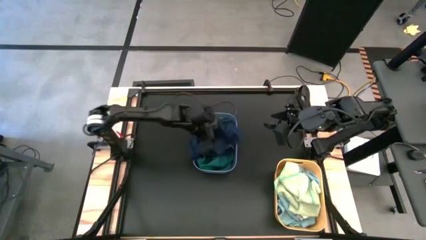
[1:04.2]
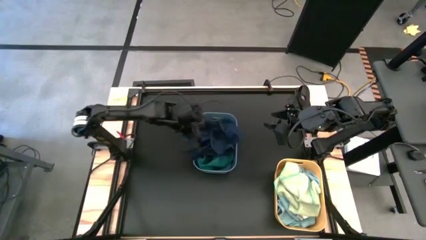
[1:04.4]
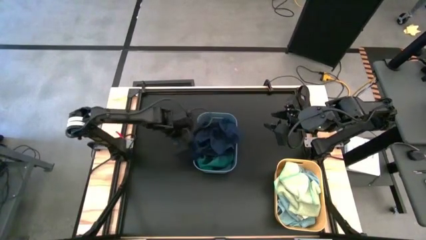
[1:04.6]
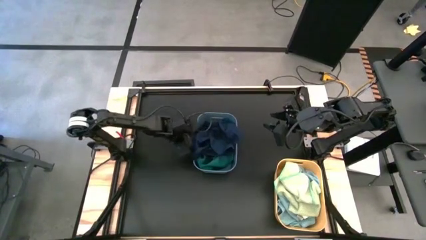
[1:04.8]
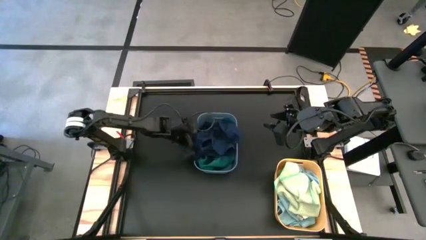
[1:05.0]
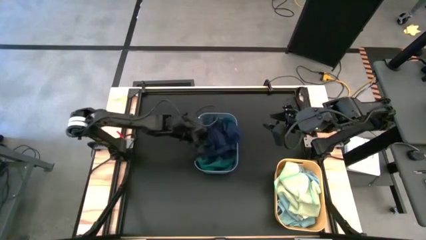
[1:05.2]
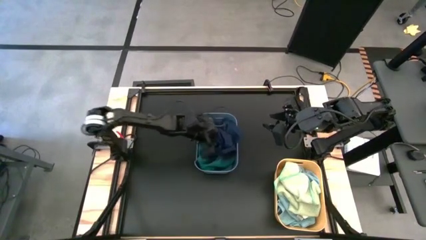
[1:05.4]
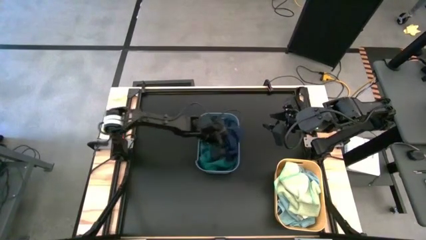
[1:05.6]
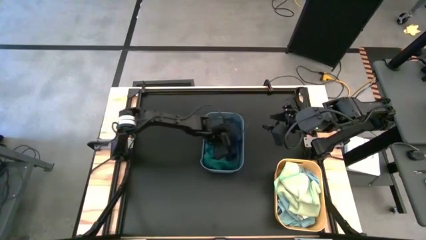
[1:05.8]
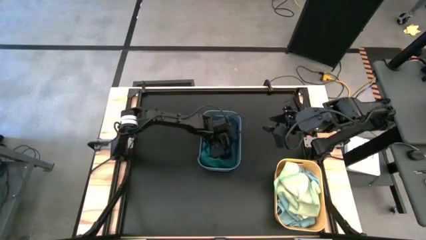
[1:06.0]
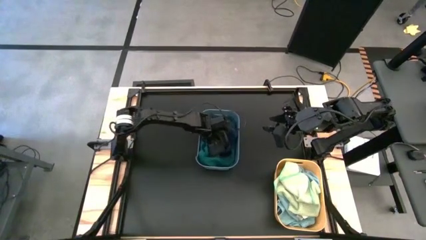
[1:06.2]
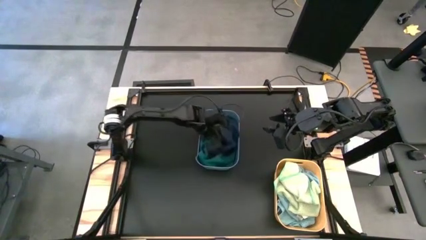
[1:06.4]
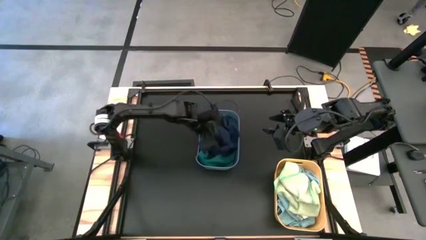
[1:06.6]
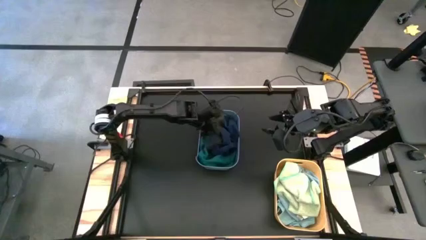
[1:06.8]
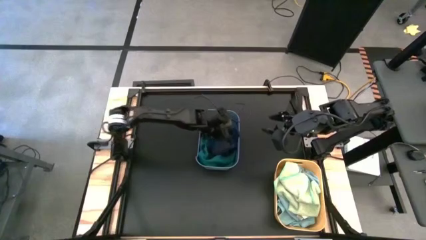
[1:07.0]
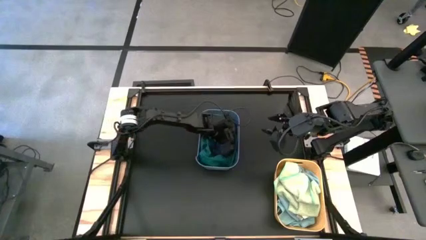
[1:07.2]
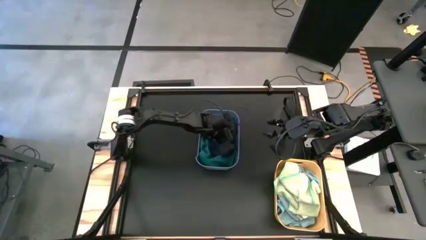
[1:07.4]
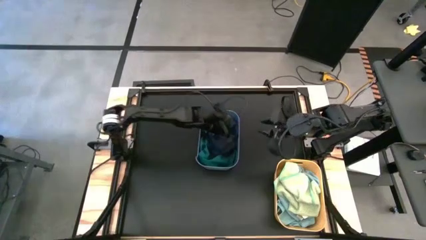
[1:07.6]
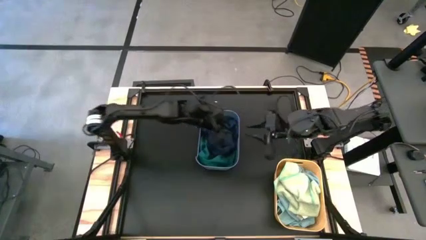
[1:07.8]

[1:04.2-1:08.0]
Task: Sort microfiber towel by color & place in baskets
Put the dark blue microfiber cloth into the blue bin

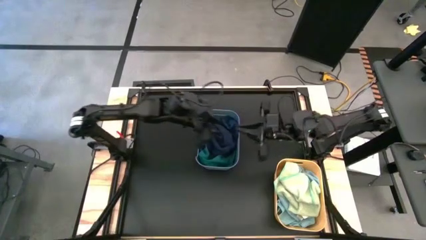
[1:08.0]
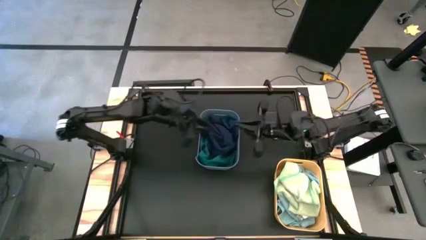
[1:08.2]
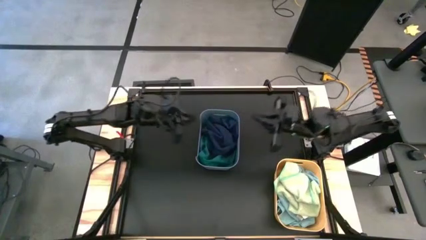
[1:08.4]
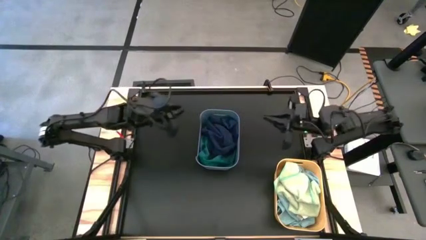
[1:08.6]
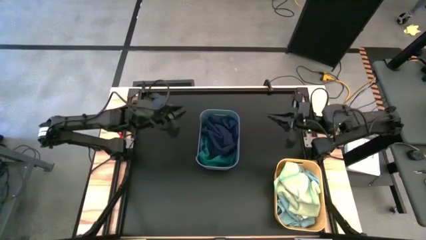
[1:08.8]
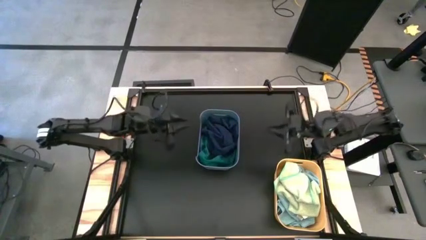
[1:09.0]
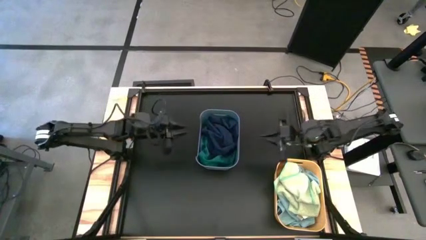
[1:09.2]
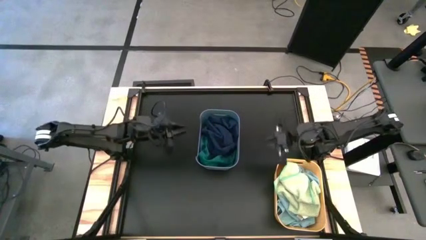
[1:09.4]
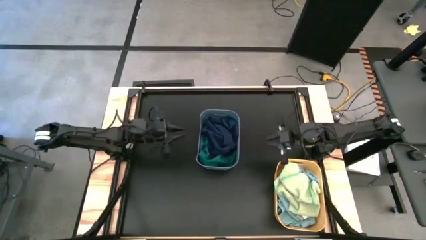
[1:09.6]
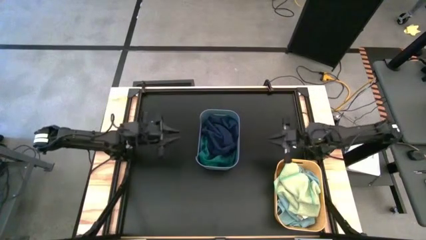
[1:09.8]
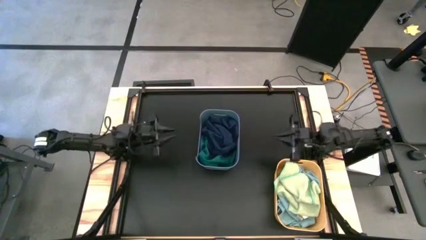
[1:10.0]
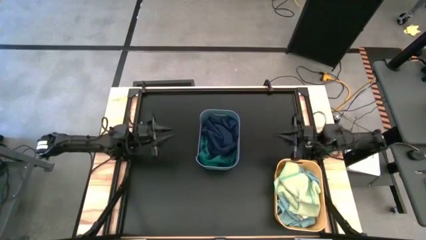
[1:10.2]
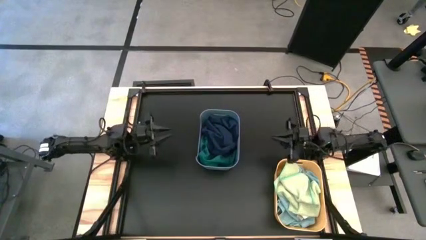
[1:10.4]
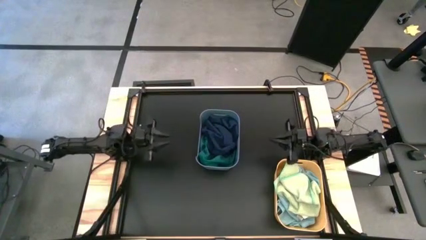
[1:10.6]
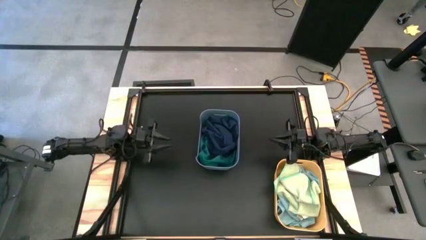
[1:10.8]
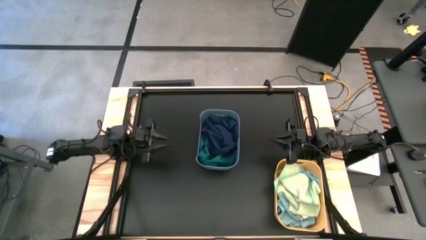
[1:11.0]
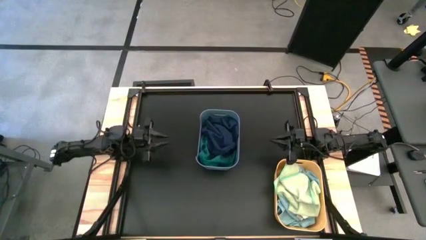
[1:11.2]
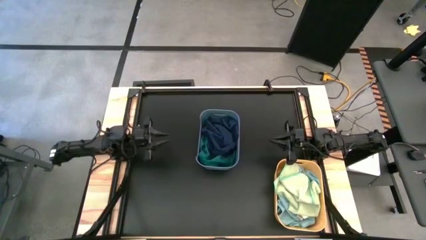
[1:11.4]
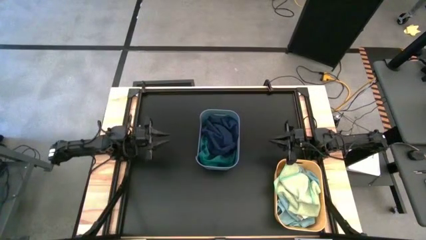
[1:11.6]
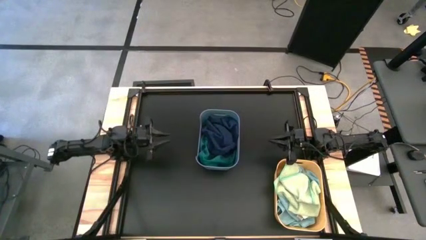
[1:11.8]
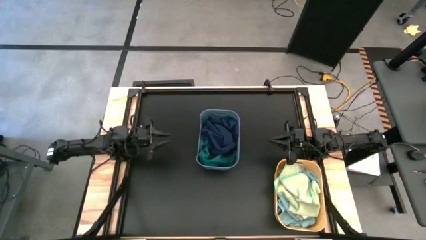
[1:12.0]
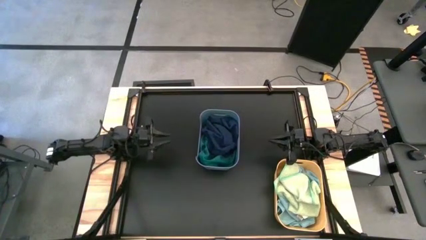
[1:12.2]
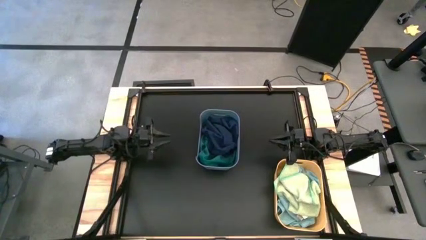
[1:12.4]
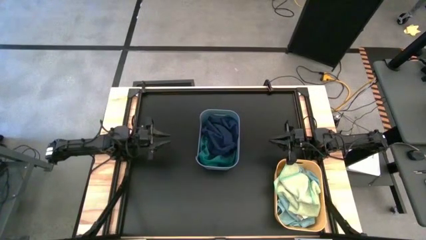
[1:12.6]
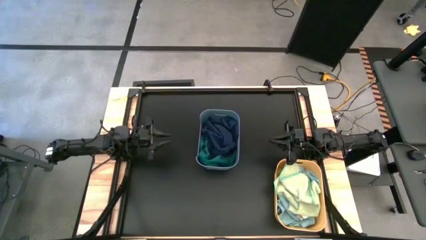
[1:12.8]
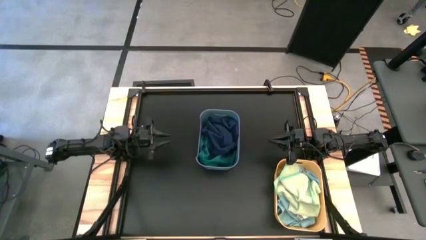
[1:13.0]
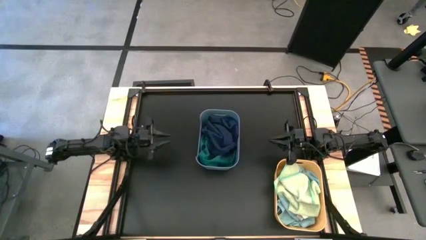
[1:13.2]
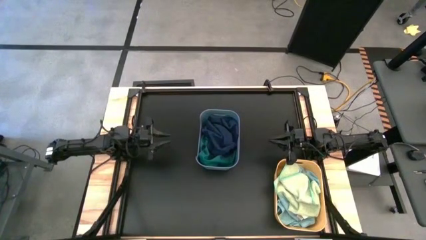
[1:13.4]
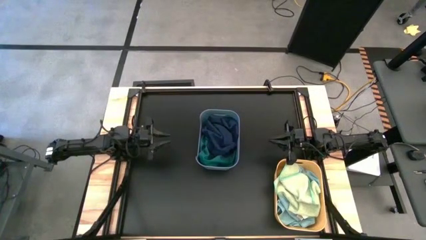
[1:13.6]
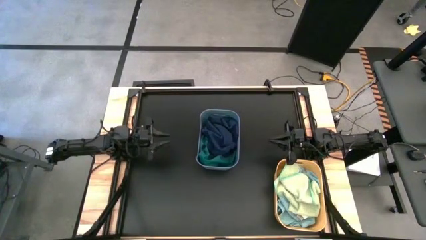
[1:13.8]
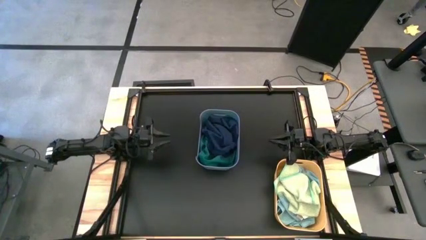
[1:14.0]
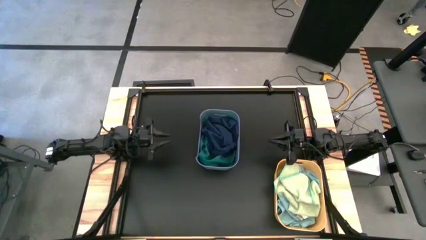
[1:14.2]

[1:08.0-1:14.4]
Return to Home Position

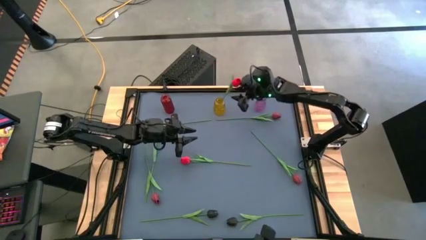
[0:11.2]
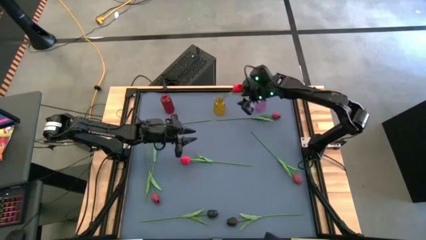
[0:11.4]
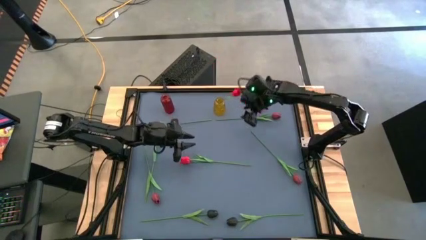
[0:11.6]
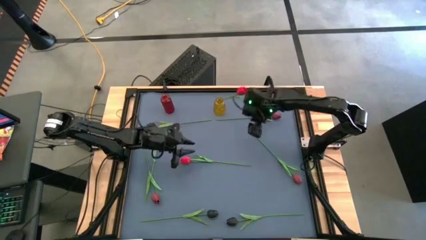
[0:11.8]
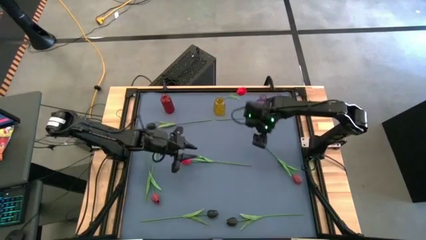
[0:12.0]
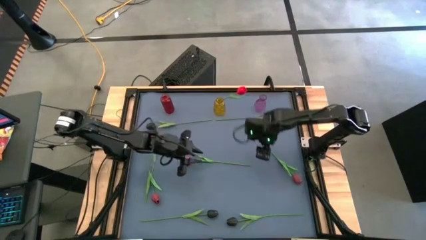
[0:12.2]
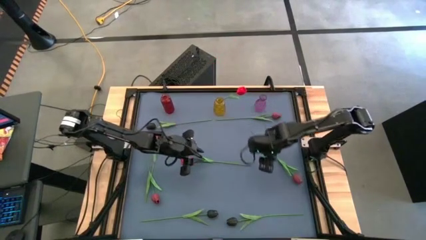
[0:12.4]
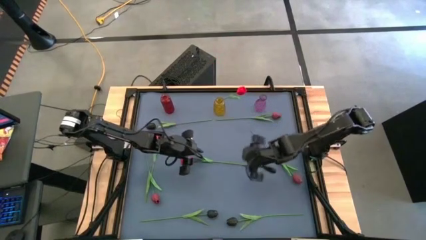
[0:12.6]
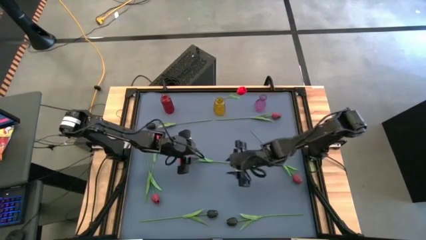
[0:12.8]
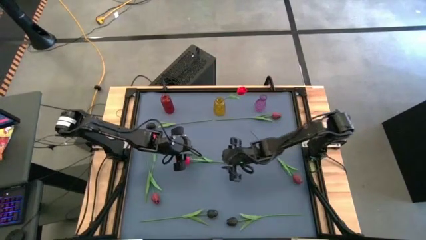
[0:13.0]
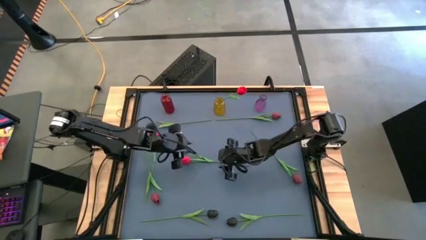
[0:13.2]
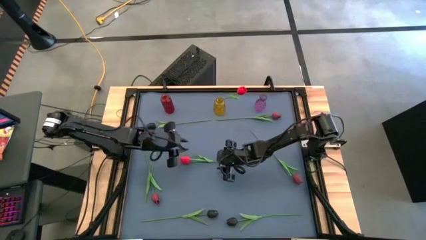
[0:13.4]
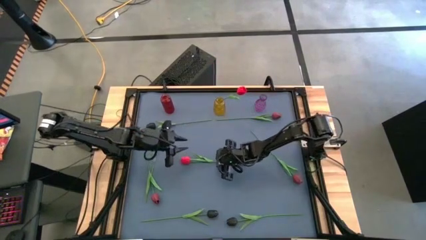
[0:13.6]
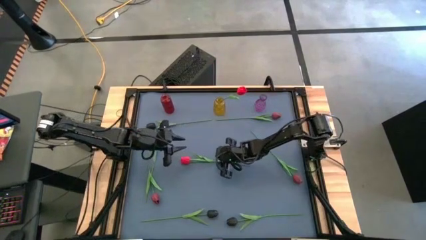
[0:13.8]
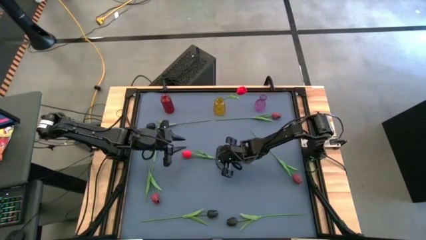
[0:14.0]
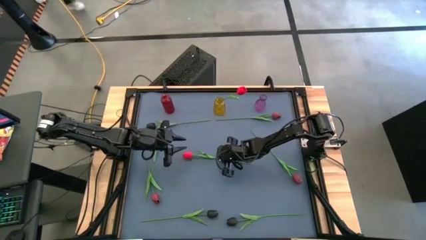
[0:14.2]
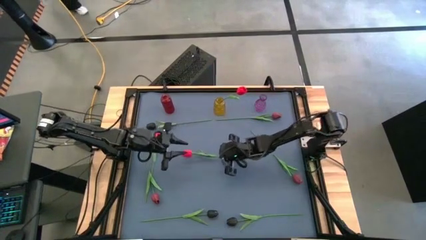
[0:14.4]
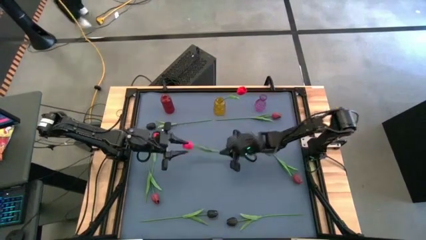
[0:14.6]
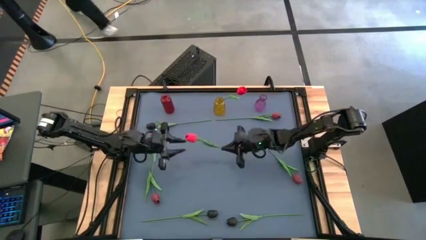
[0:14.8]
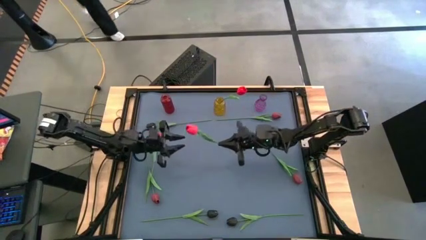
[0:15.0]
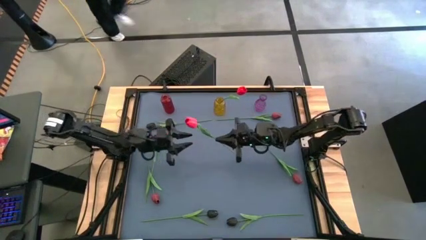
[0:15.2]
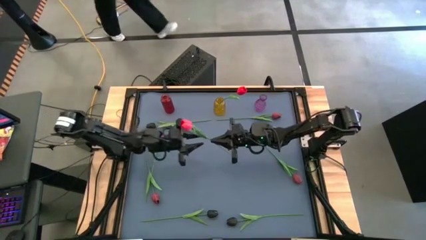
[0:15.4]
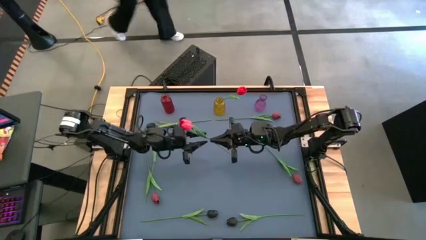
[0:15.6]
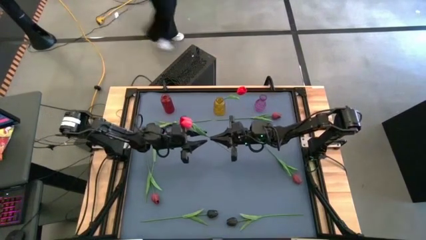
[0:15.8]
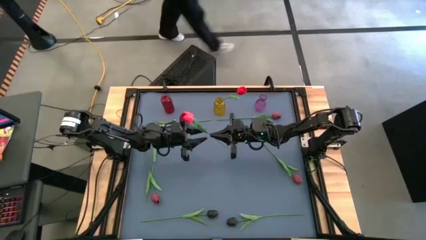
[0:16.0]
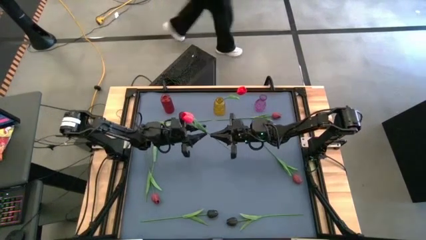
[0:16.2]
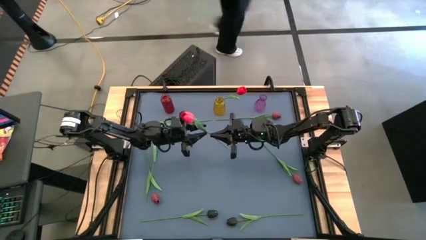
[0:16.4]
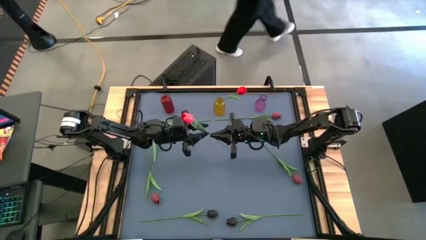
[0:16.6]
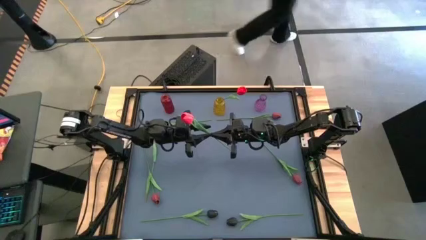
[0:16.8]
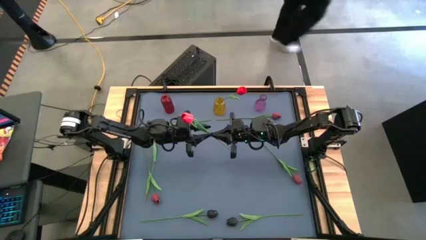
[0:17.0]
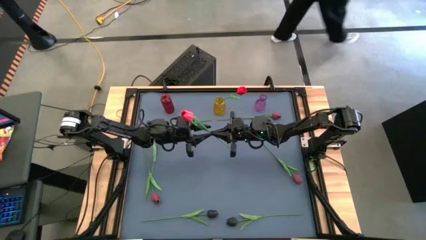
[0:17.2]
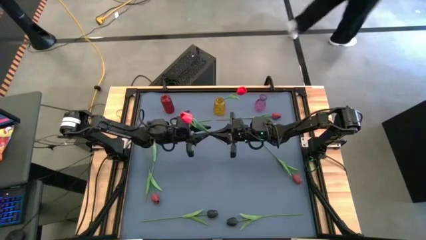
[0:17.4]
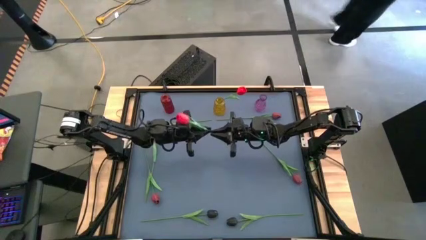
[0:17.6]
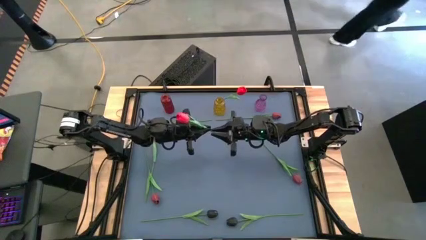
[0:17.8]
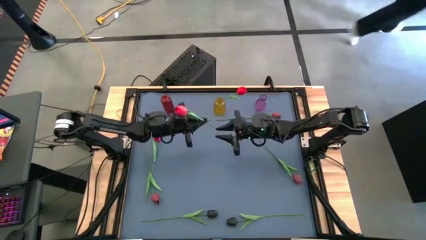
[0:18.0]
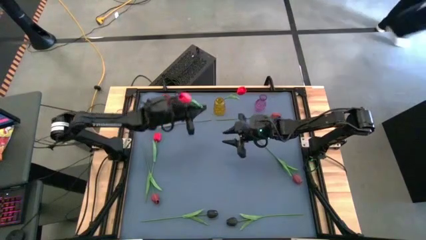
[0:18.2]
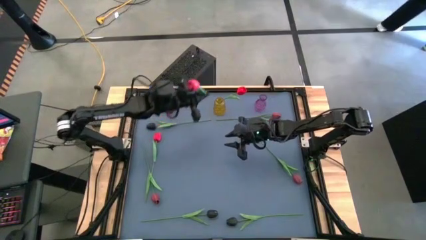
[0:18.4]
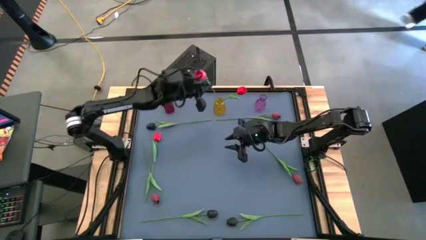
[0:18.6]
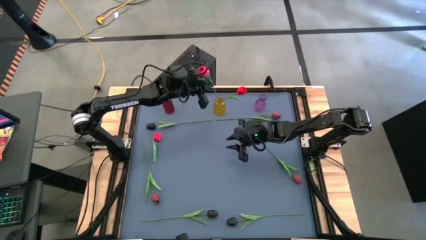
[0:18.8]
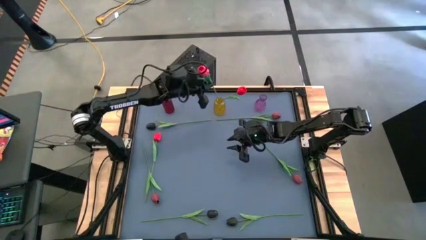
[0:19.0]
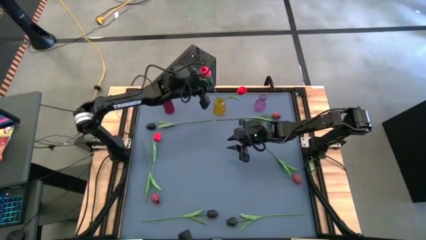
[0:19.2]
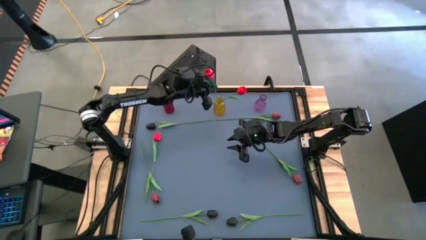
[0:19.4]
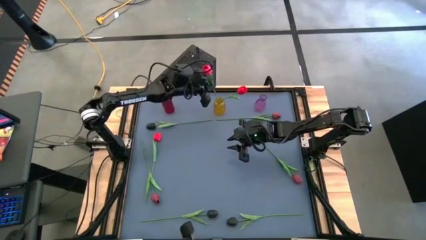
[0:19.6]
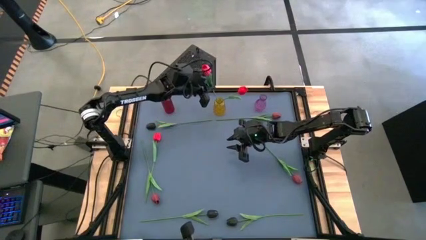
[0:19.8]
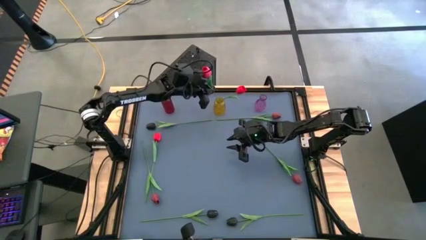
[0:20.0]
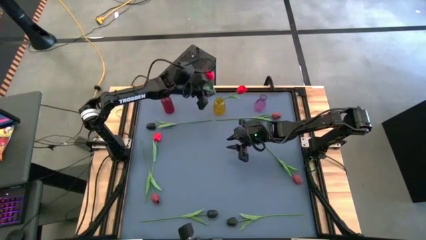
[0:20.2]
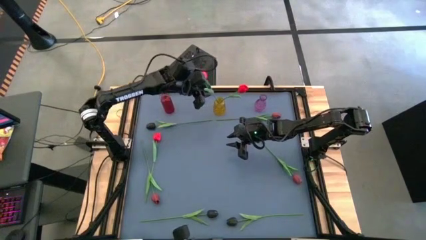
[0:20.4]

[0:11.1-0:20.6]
Task: Sort flowers into vase by color
Put the right red tulip into the yellow vase
